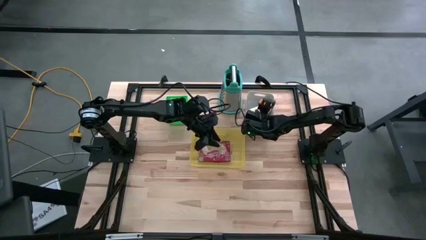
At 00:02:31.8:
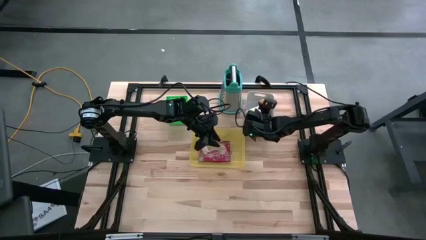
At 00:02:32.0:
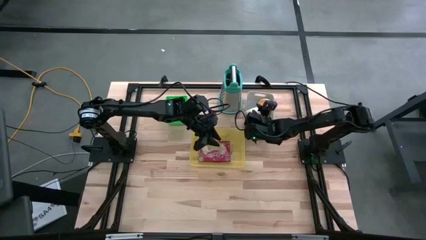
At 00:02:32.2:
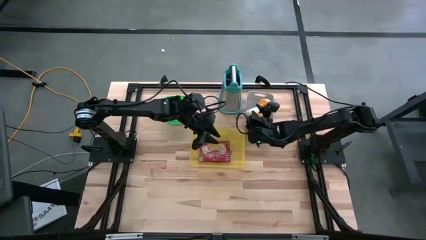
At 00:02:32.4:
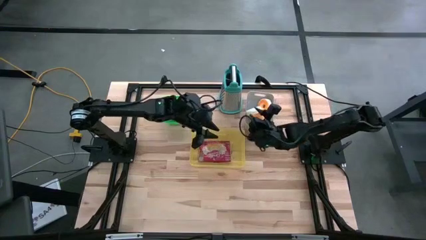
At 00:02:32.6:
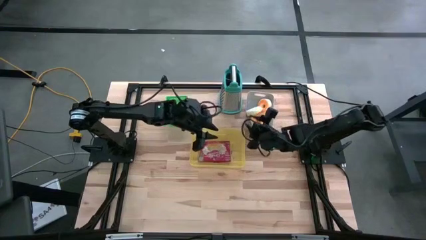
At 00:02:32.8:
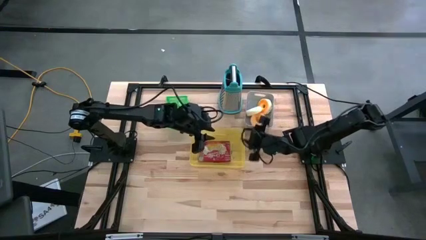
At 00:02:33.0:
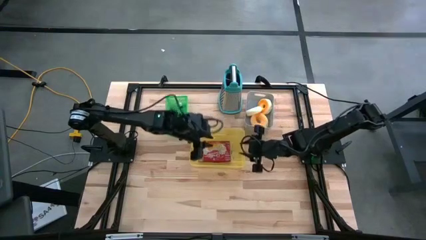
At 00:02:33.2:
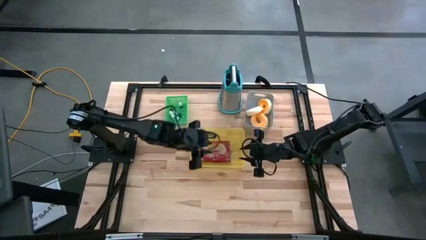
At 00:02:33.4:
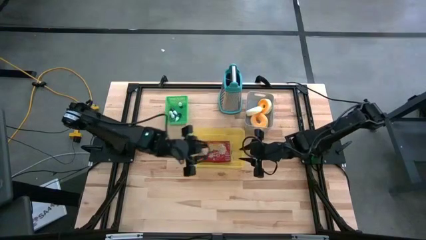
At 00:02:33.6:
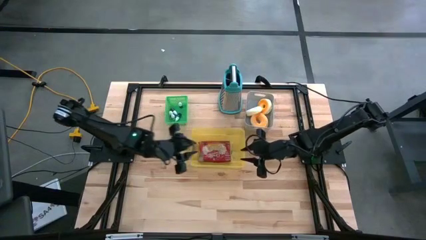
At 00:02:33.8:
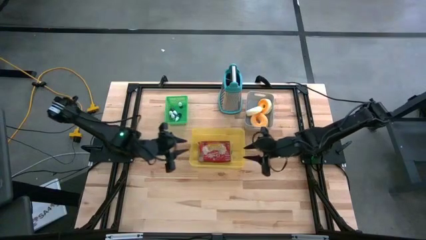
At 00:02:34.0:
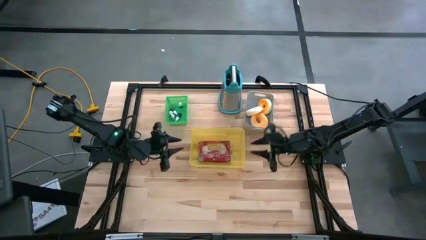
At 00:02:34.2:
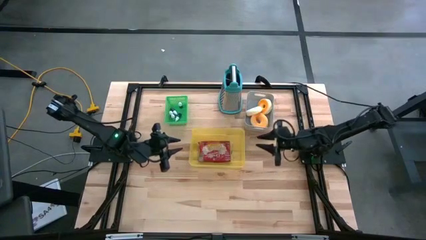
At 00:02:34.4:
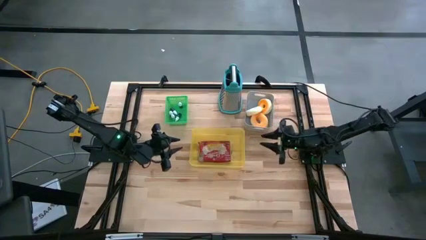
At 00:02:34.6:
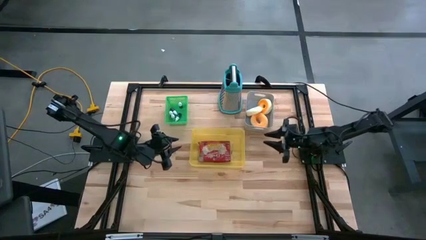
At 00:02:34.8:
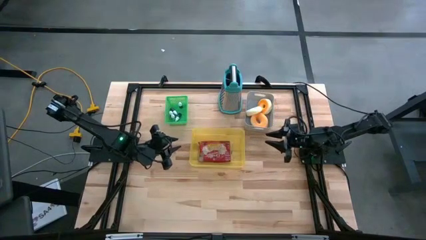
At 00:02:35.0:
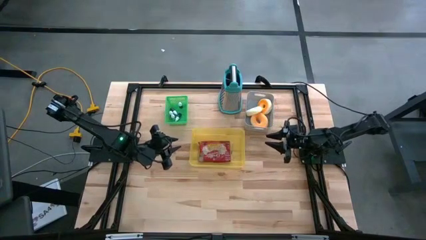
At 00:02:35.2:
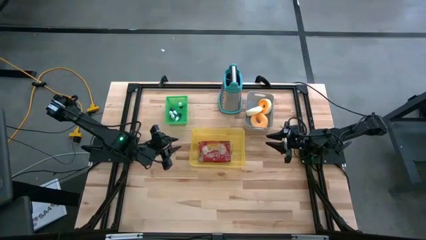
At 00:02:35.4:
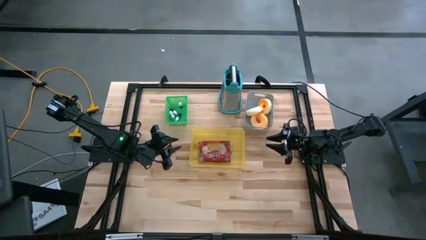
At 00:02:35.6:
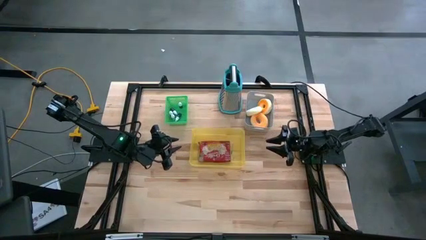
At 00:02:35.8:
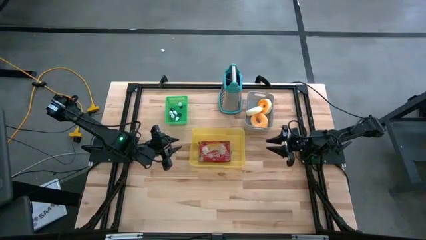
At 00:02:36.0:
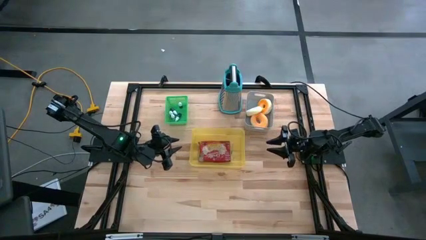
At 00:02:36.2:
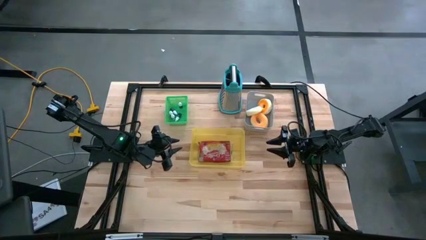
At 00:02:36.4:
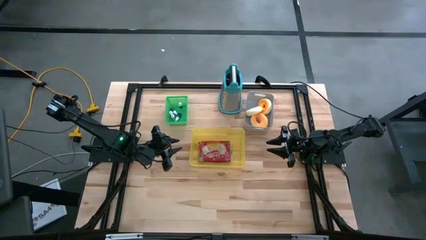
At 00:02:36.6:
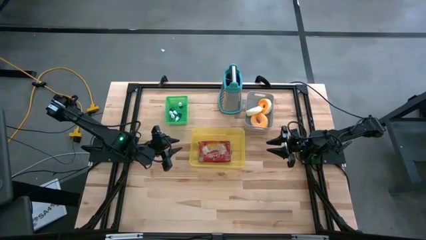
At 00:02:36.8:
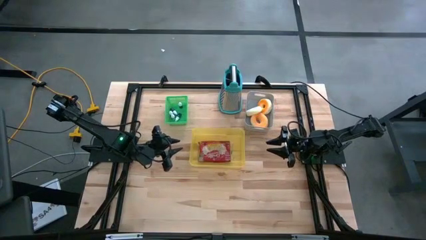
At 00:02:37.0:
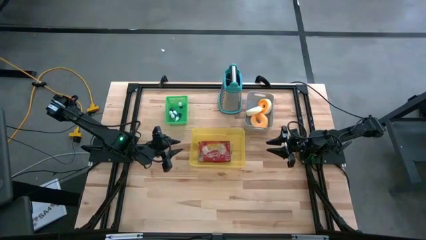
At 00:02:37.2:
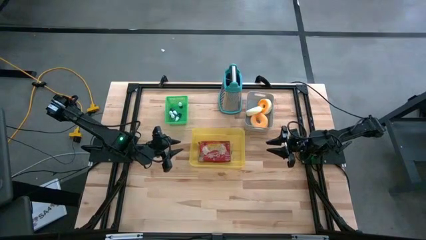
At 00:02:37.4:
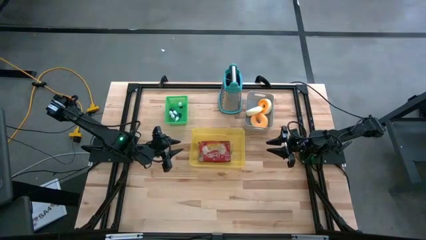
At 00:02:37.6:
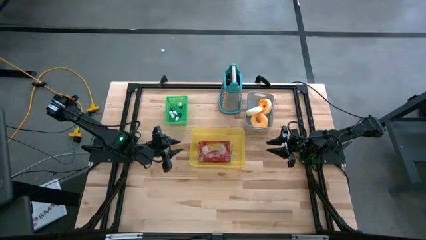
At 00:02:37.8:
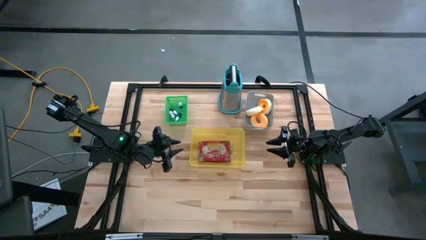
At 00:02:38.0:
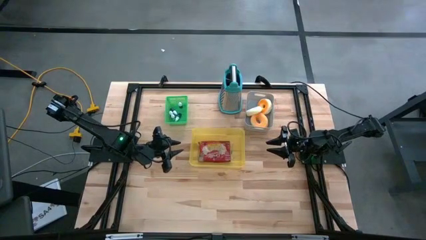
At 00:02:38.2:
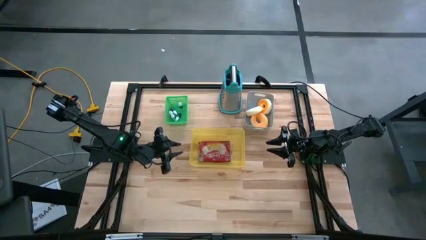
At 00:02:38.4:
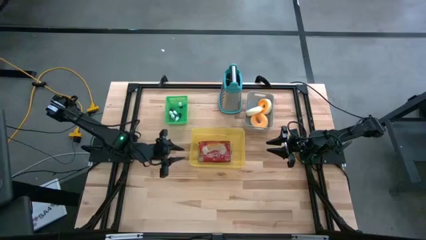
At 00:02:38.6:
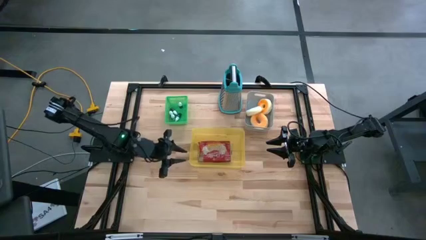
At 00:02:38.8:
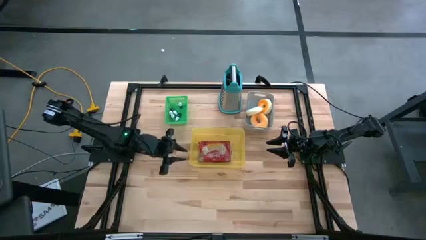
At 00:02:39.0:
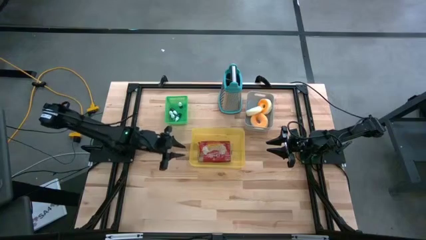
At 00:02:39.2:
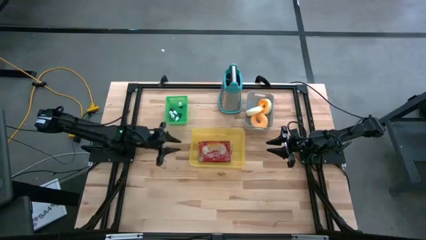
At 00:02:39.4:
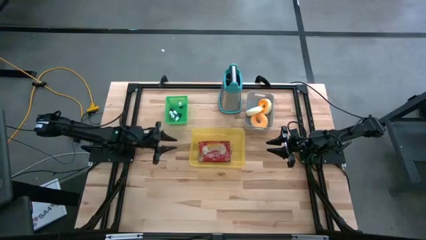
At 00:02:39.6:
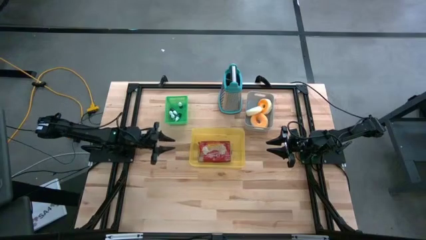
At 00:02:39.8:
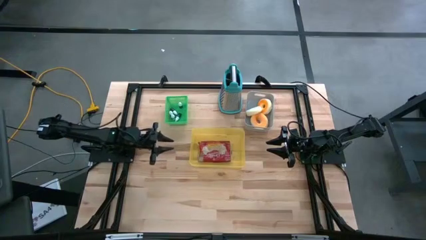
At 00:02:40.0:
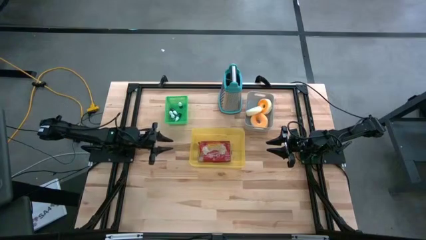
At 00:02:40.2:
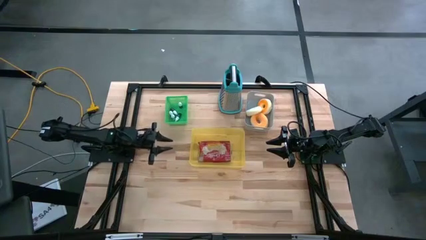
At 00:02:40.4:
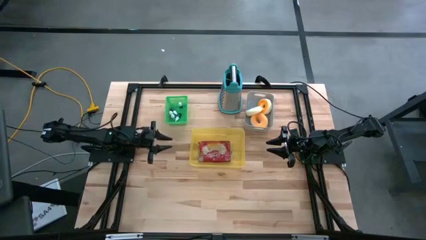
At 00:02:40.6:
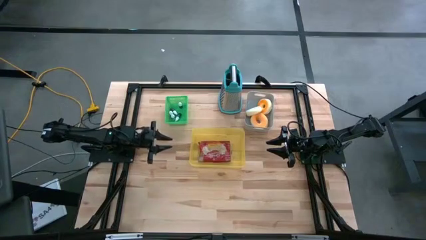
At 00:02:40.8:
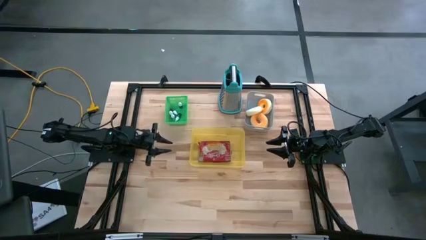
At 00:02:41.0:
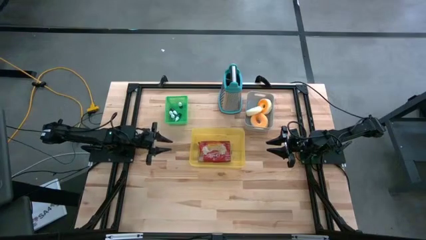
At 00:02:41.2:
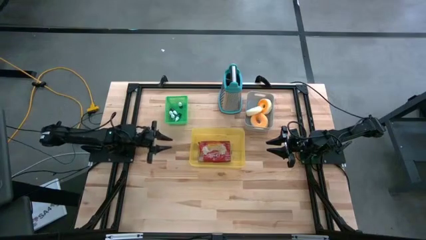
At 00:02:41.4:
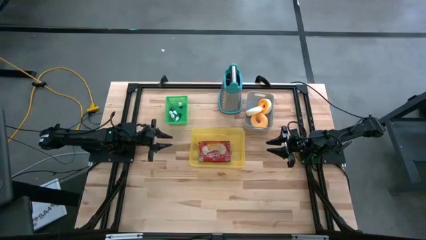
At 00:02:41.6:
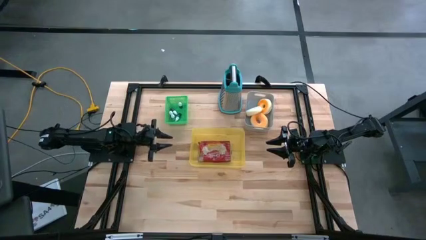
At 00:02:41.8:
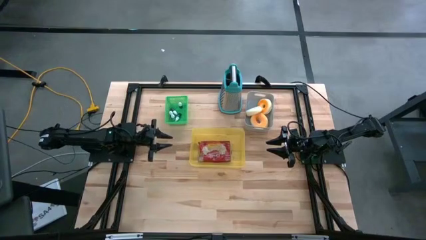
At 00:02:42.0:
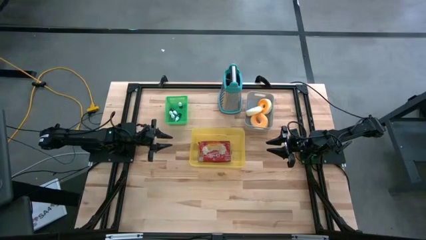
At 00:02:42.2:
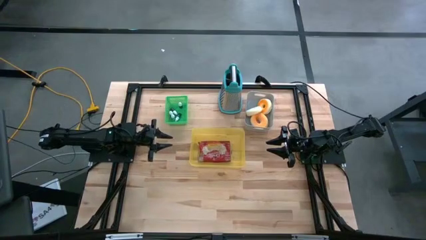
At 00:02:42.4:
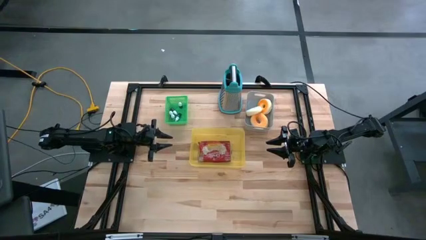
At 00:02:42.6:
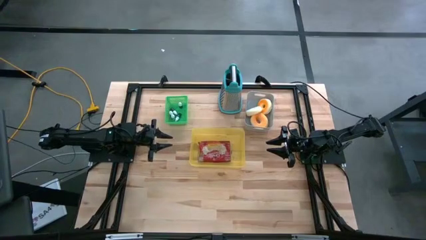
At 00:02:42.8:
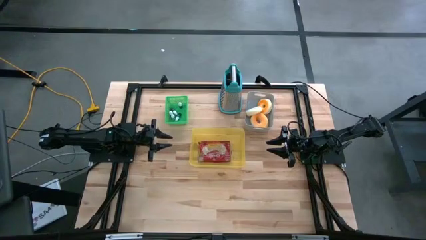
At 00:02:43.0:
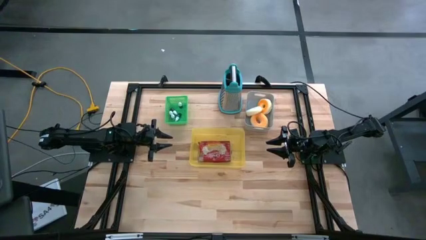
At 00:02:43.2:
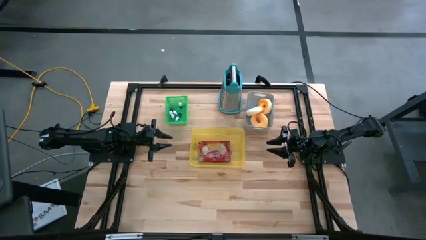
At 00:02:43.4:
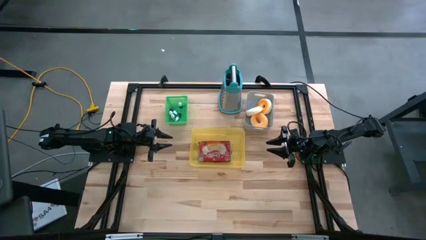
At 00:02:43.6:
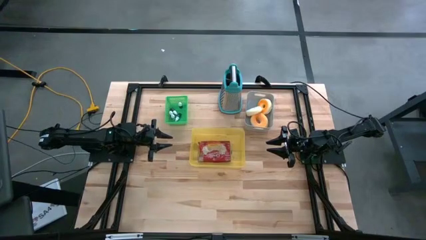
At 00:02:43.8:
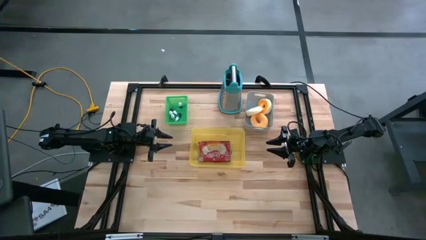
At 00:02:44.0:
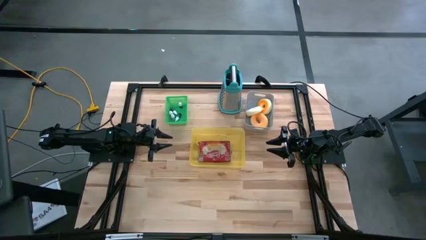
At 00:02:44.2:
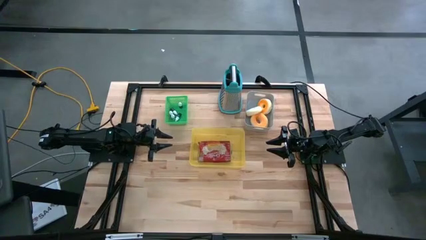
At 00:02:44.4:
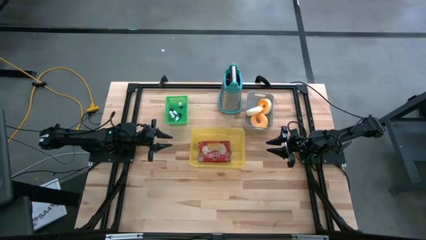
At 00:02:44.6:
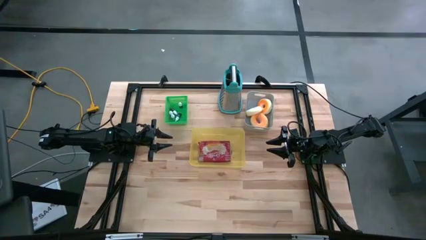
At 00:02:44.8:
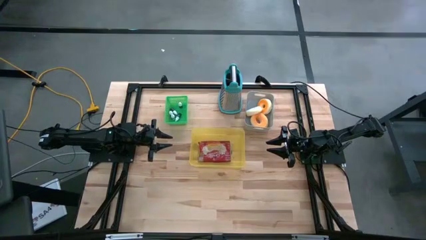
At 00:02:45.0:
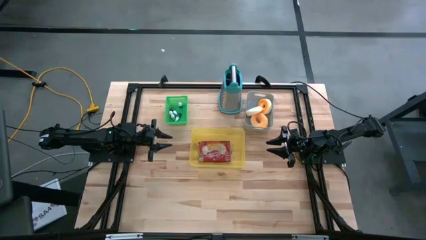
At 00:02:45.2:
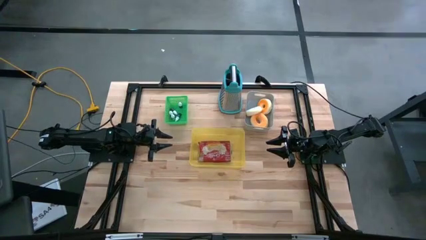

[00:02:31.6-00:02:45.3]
Return to Home Position
